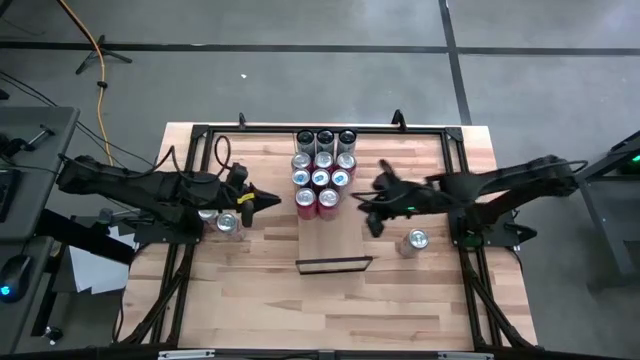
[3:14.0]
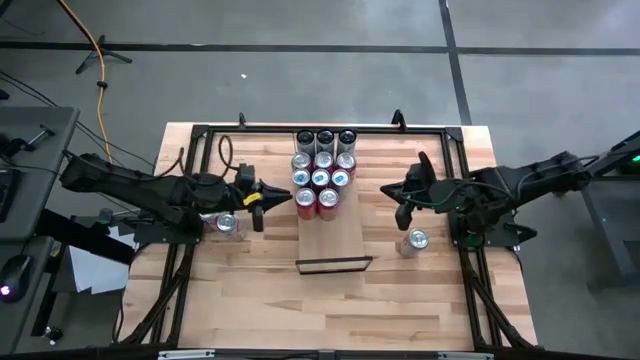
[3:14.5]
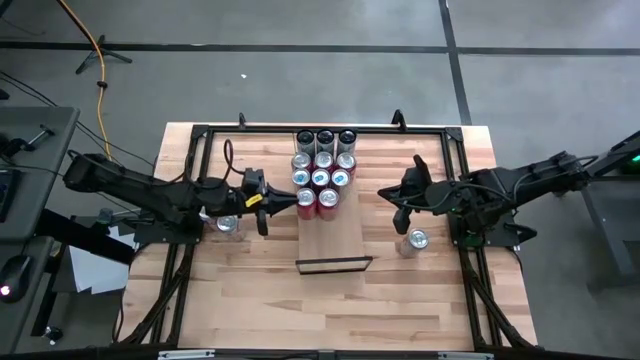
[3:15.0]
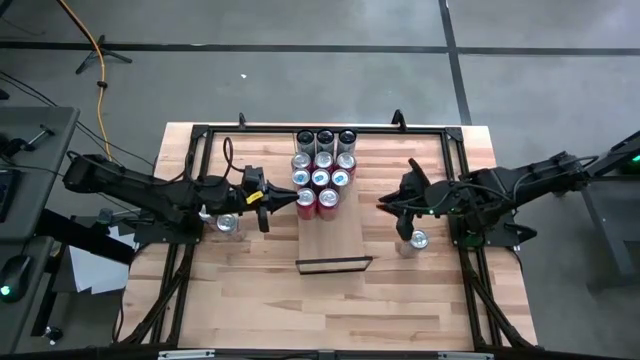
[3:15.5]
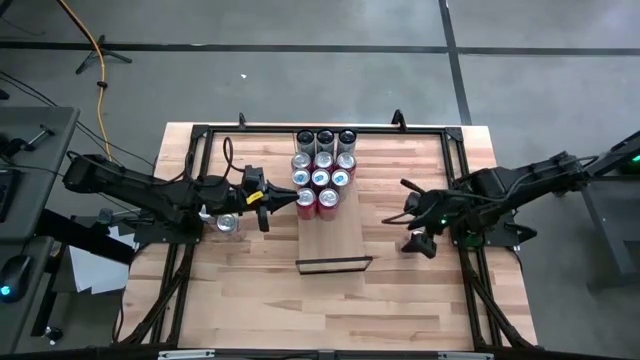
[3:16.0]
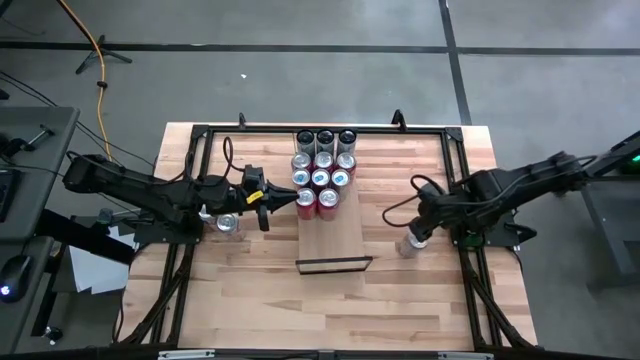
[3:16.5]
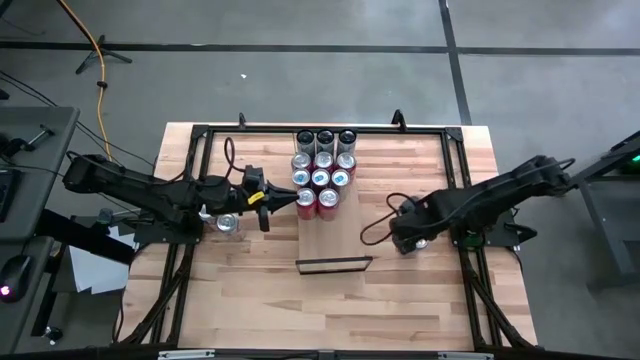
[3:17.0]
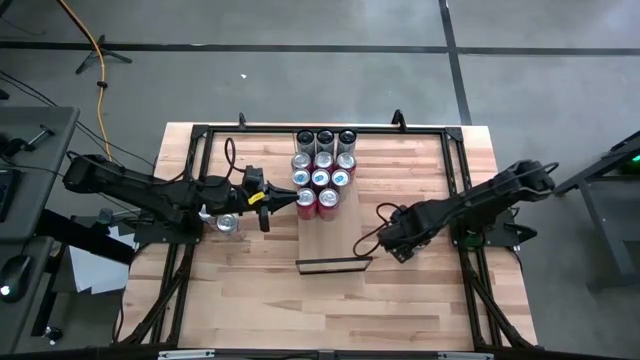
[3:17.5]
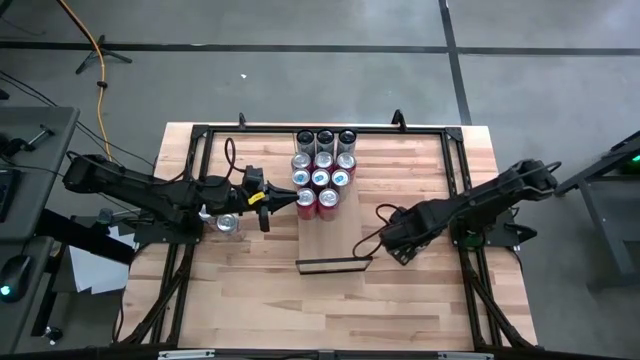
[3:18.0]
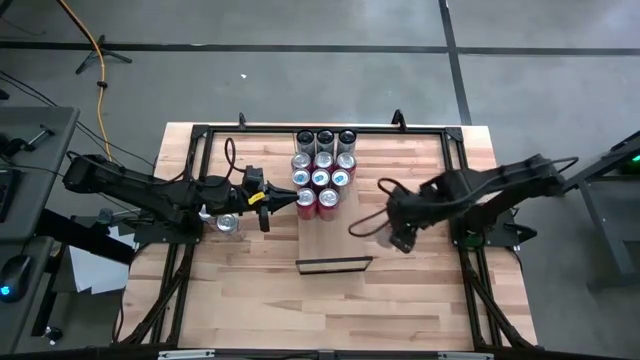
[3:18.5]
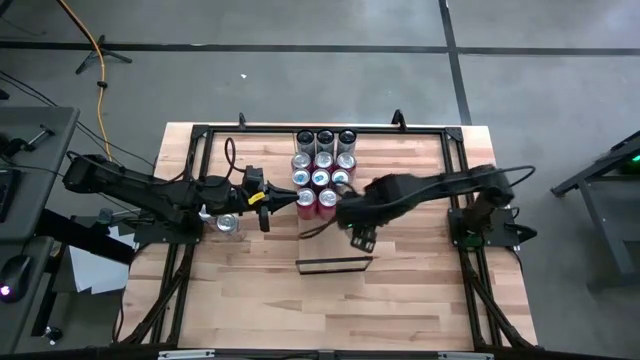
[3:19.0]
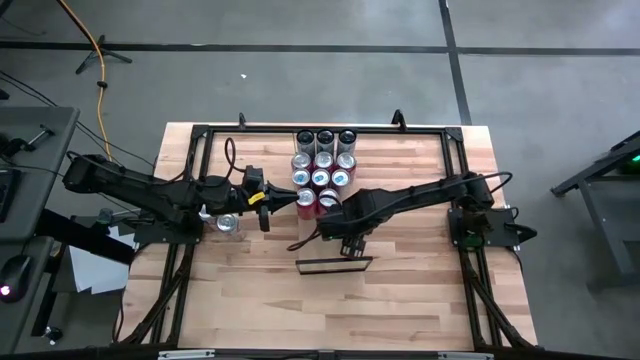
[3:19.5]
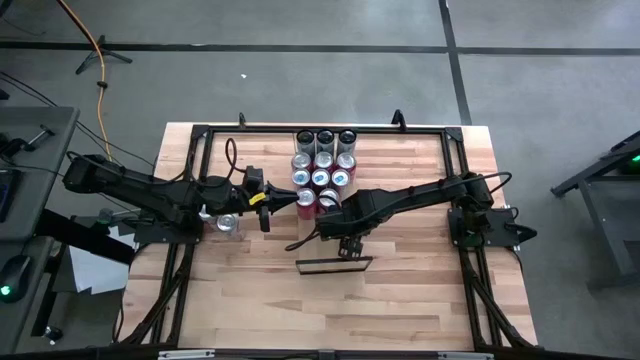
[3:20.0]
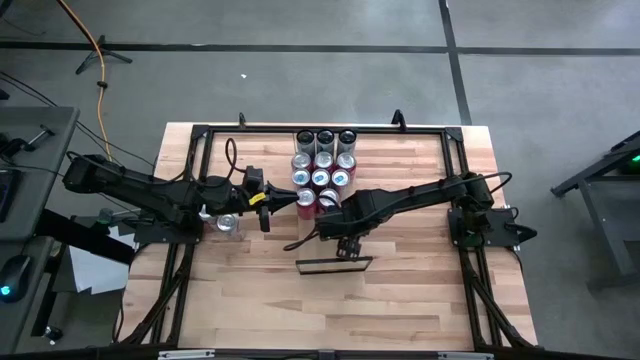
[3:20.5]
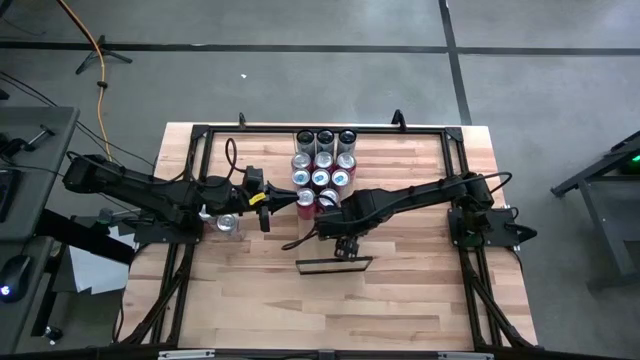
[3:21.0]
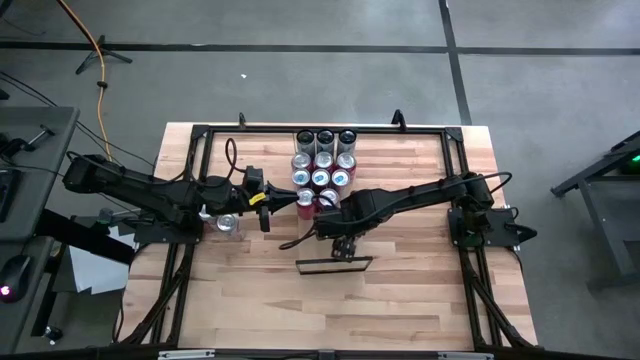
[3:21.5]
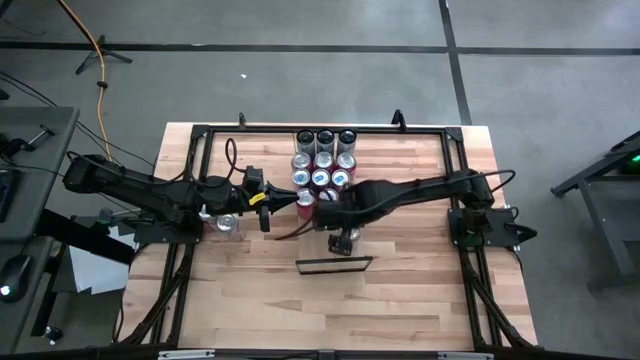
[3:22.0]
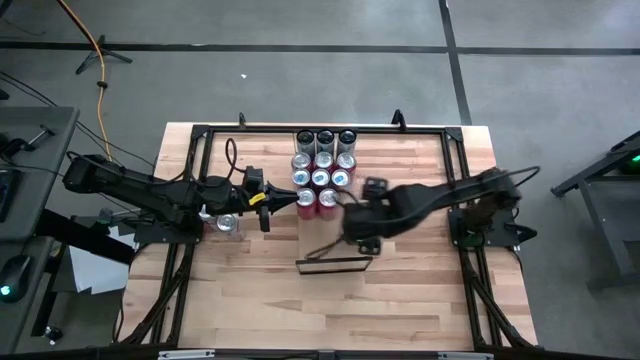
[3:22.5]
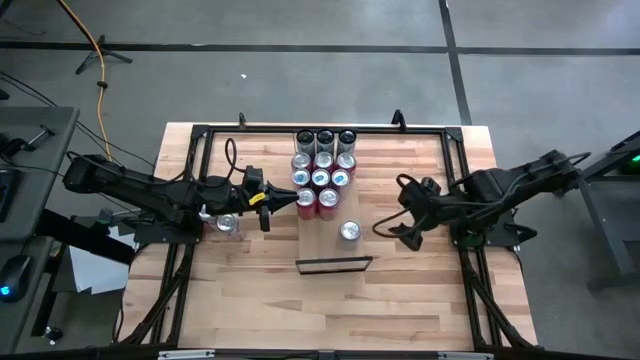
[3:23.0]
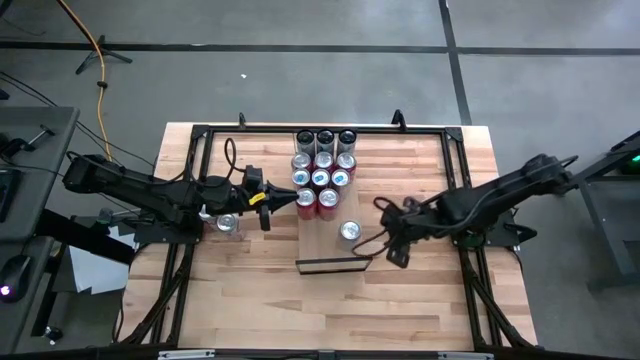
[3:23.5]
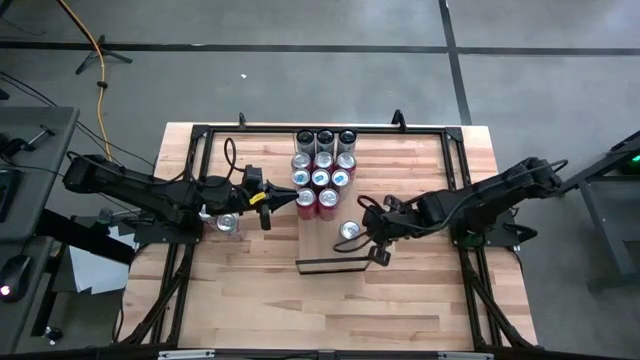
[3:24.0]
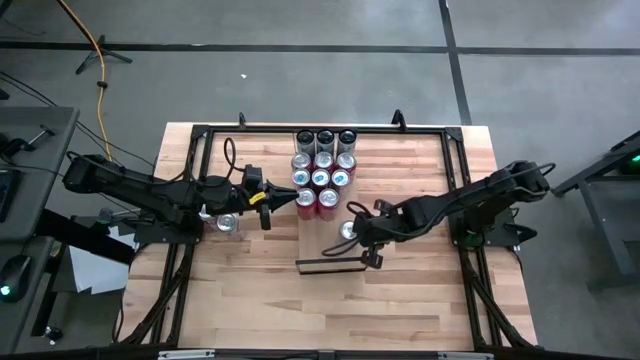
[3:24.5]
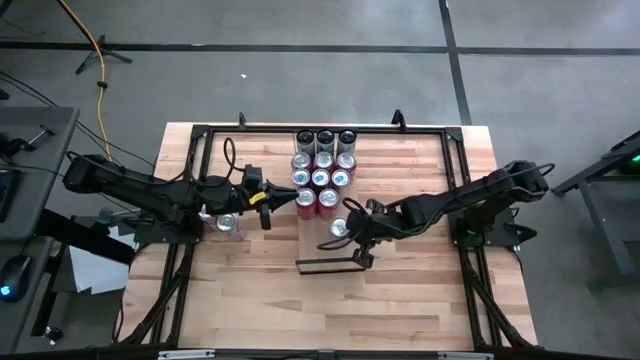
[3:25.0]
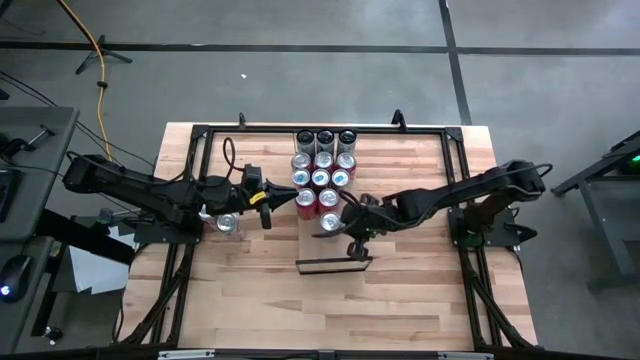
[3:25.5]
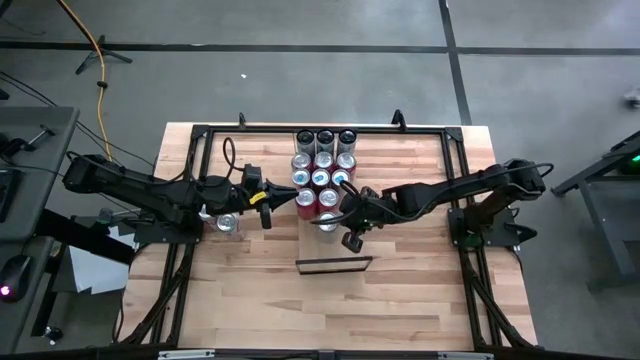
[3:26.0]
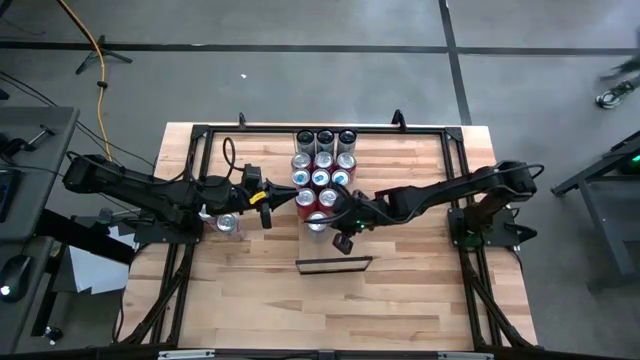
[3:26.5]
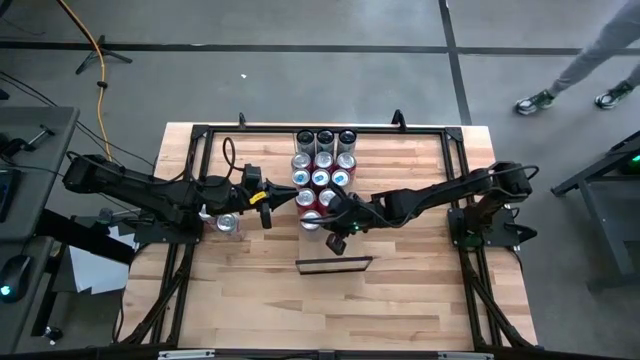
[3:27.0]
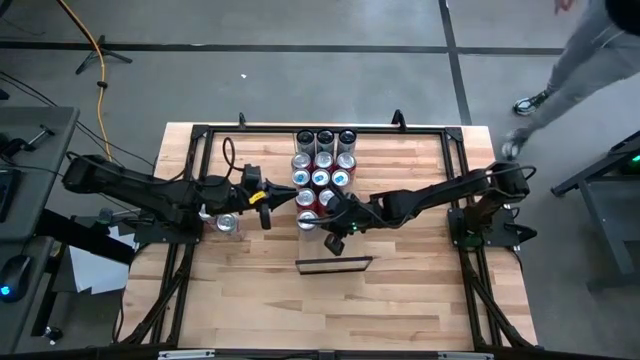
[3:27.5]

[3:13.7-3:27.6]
Task: Place canned beverage on shelf
Put the top right red/silver soda can on the shelf

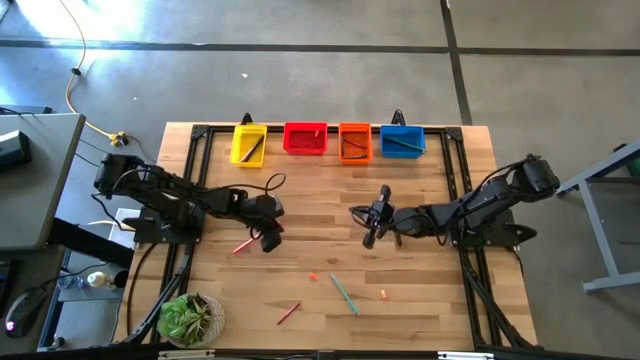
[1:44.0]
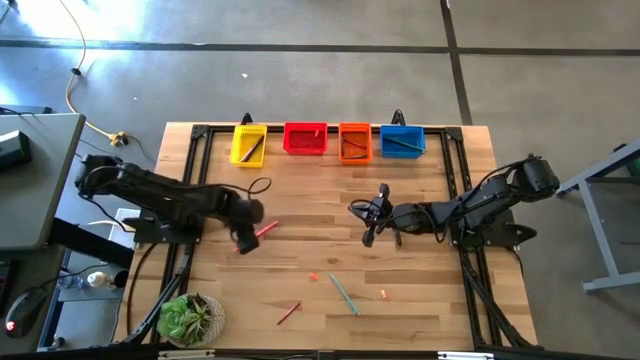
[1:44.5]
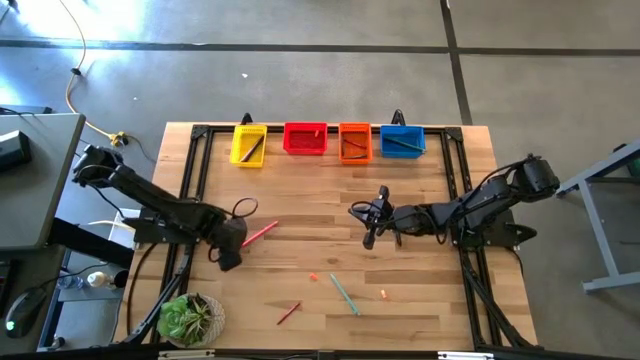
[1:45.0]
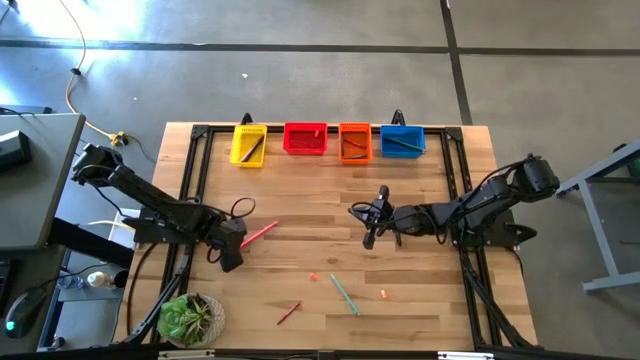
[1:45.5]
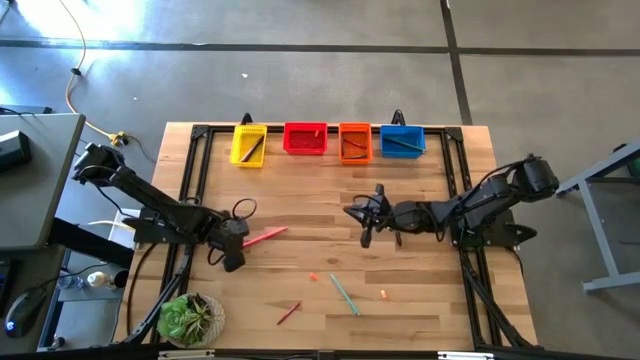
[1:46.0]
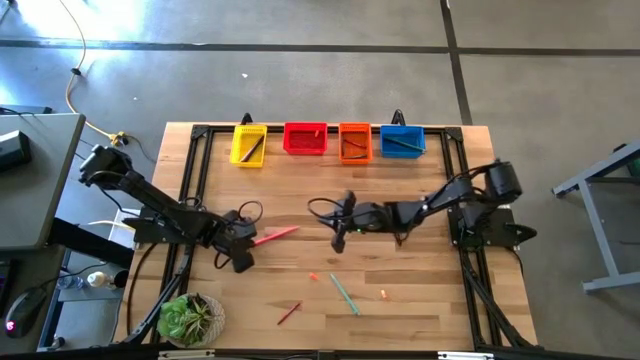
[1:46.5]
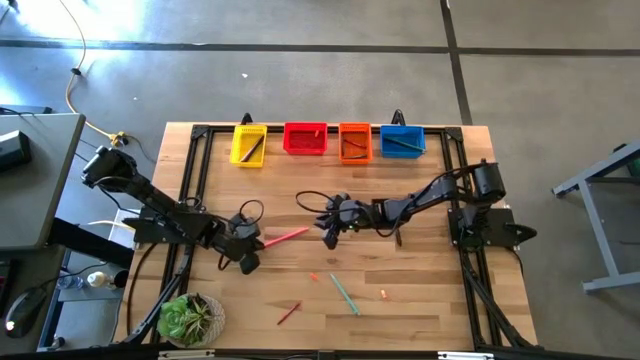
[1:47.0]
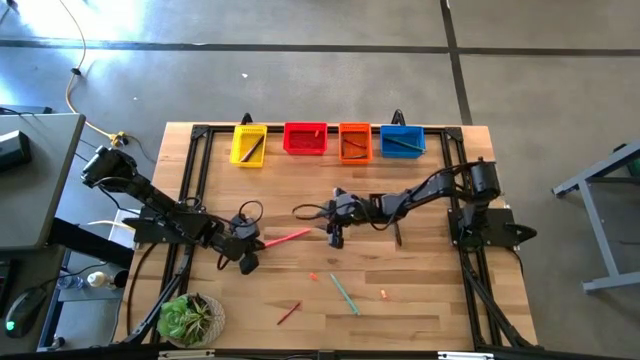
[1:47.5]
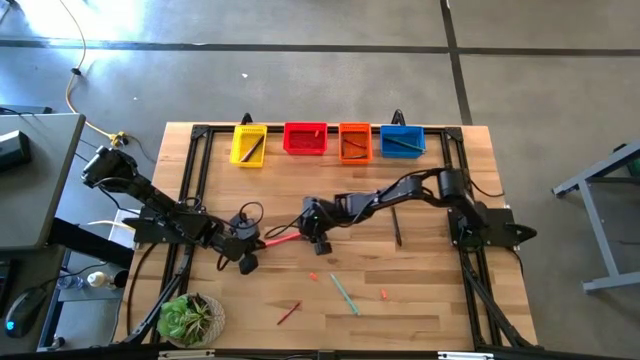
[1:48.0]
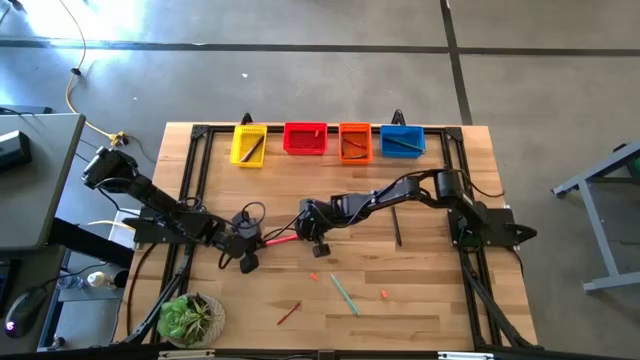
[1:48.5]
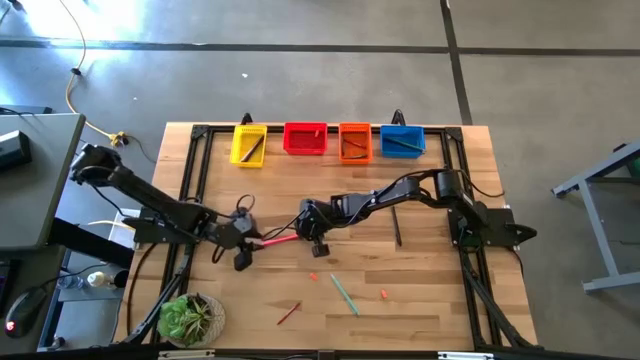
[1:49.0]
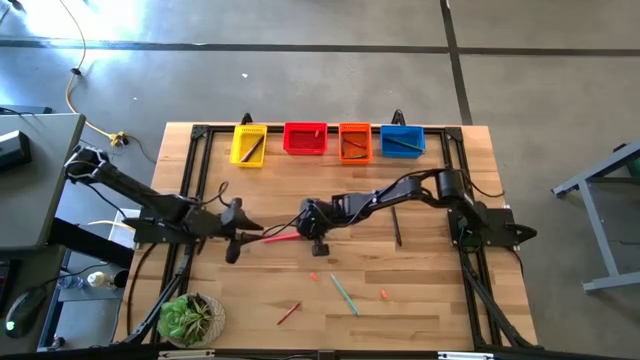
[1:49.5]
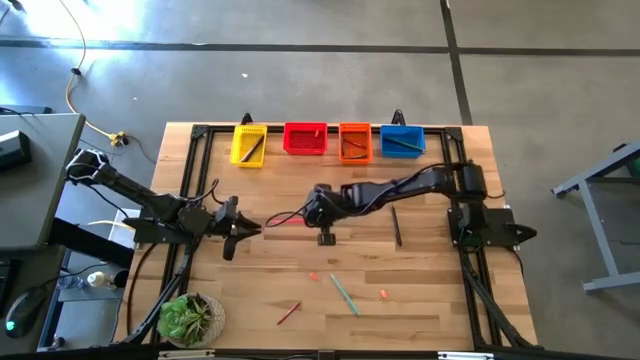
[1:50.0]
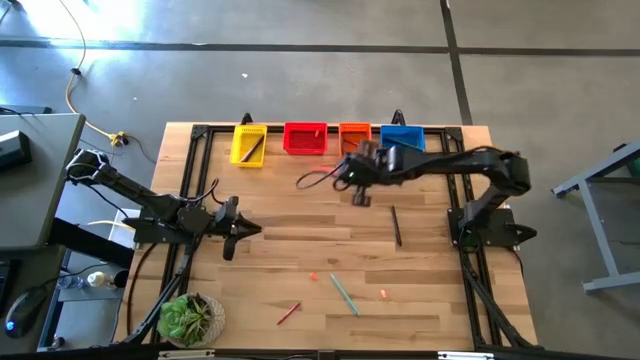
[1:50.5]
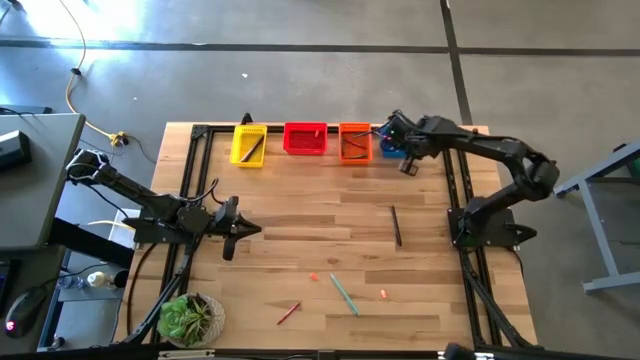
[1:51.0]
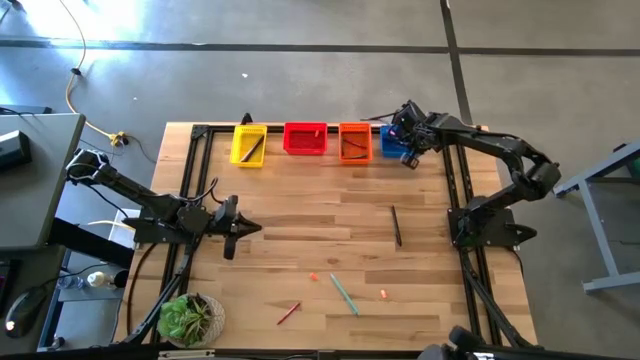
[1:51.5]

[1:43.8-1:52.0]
Task: Sort crayons/erasers/pens/pencils in bins
Put the pink pencil into the blue basket
